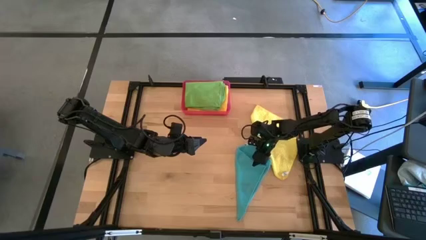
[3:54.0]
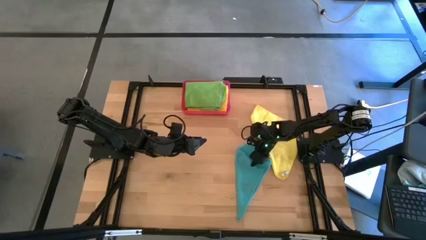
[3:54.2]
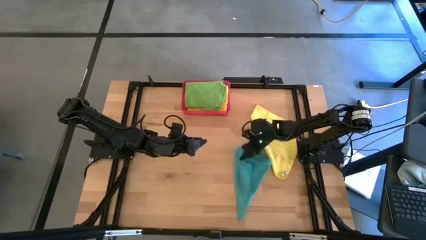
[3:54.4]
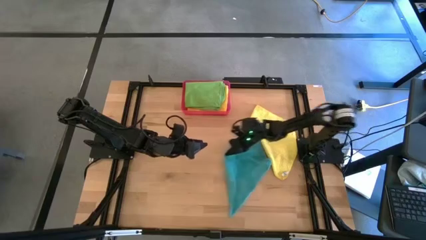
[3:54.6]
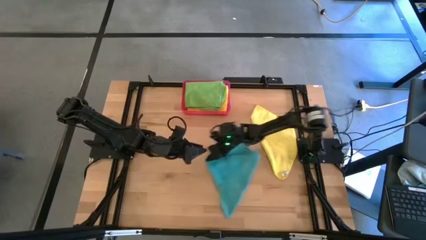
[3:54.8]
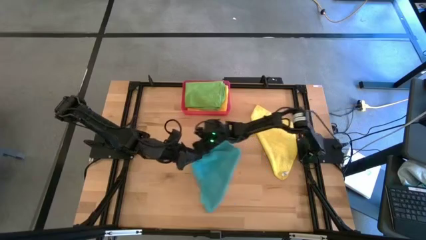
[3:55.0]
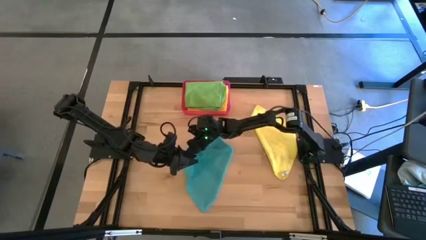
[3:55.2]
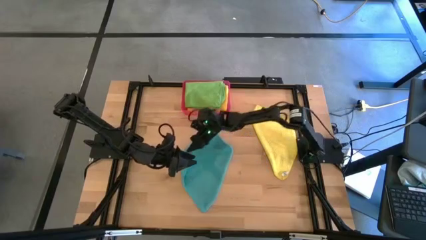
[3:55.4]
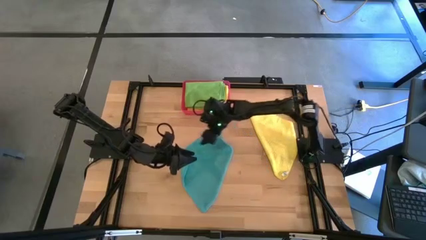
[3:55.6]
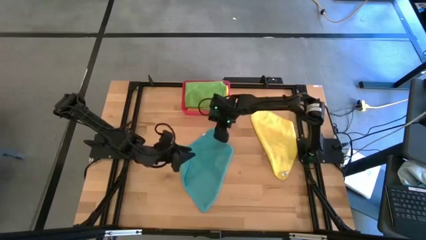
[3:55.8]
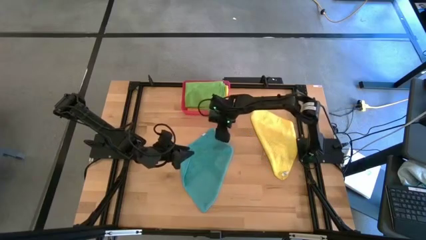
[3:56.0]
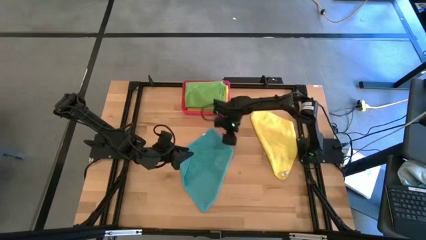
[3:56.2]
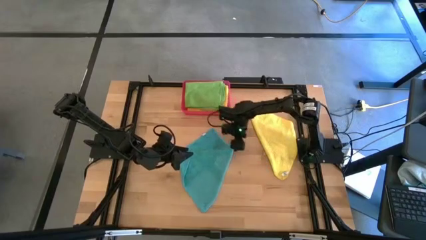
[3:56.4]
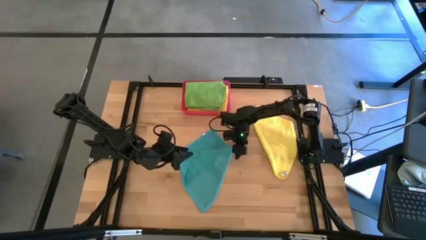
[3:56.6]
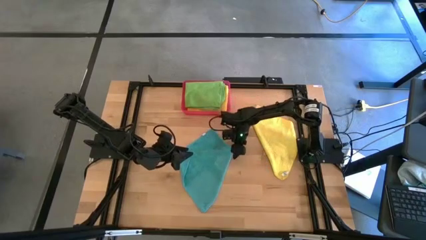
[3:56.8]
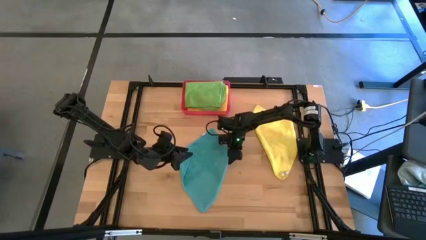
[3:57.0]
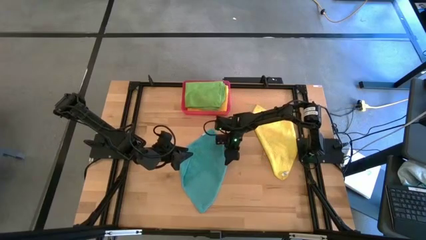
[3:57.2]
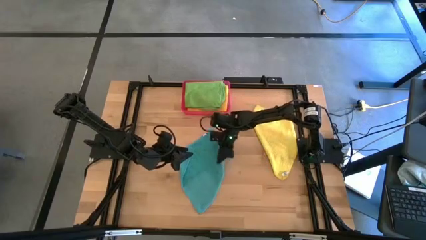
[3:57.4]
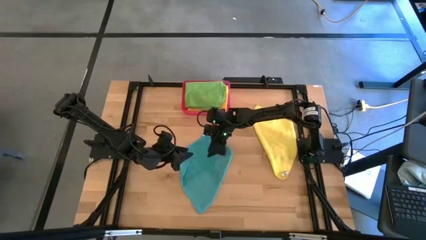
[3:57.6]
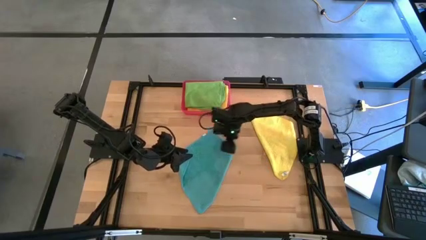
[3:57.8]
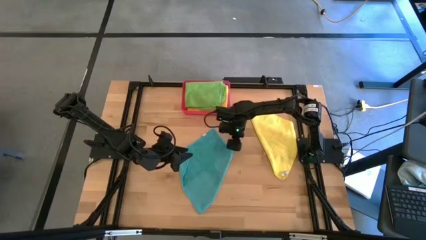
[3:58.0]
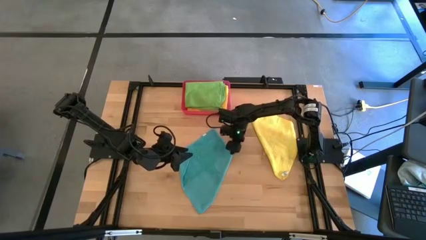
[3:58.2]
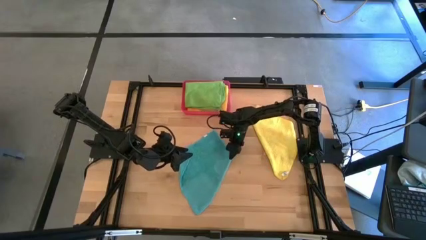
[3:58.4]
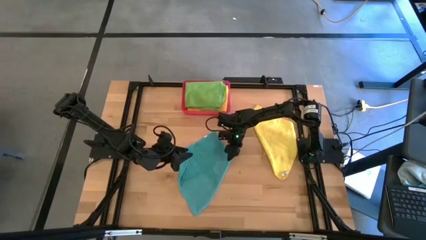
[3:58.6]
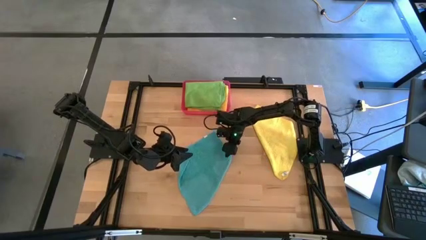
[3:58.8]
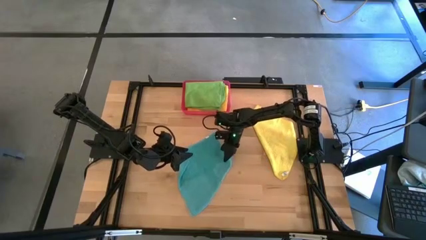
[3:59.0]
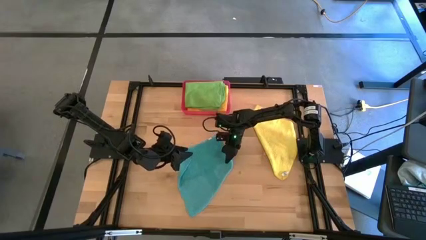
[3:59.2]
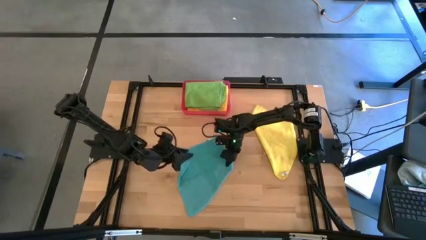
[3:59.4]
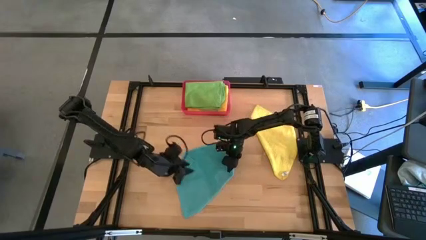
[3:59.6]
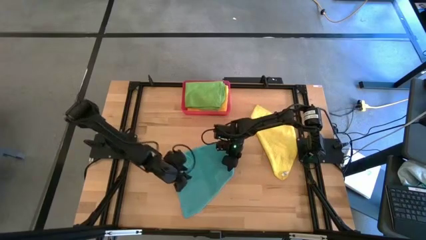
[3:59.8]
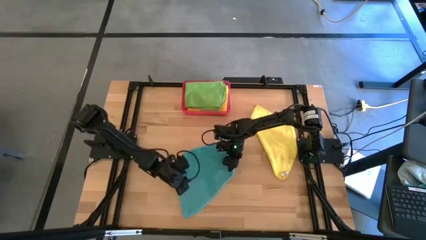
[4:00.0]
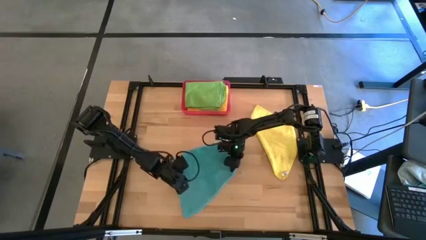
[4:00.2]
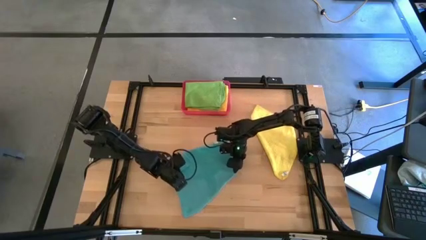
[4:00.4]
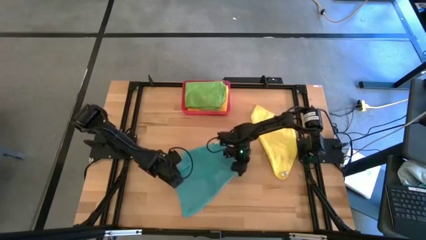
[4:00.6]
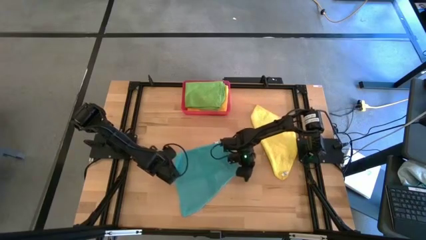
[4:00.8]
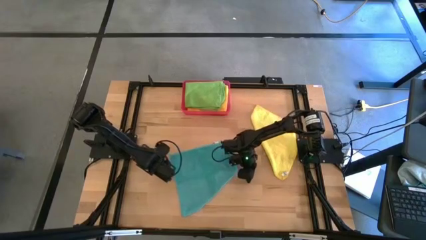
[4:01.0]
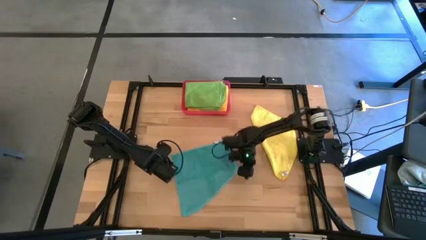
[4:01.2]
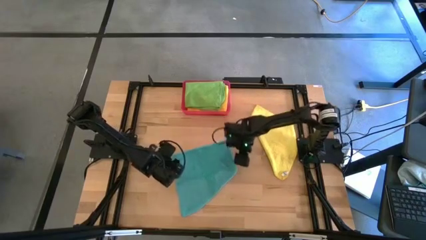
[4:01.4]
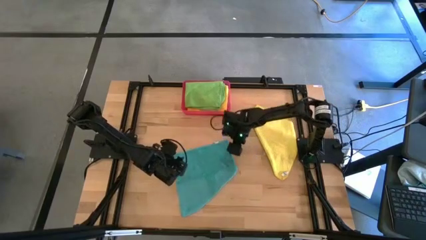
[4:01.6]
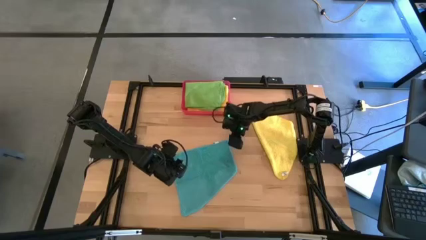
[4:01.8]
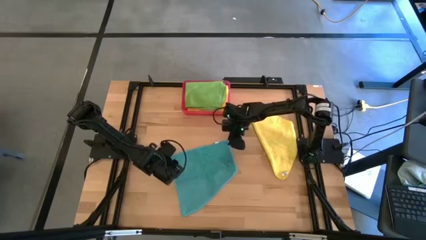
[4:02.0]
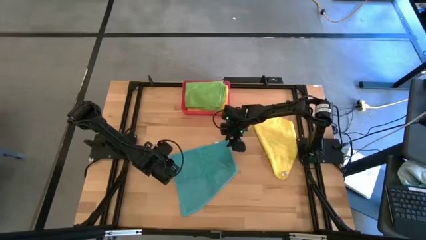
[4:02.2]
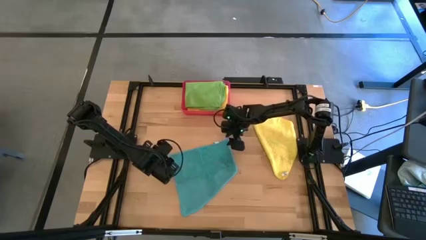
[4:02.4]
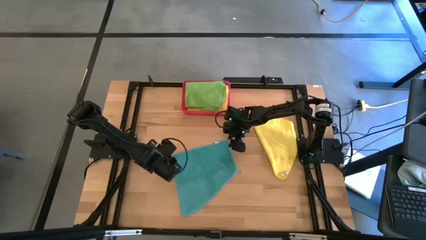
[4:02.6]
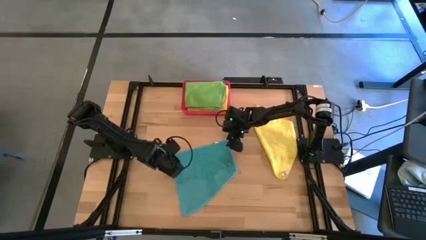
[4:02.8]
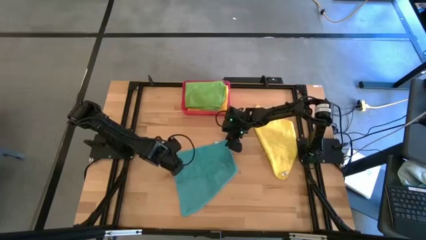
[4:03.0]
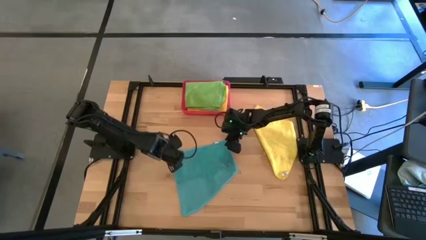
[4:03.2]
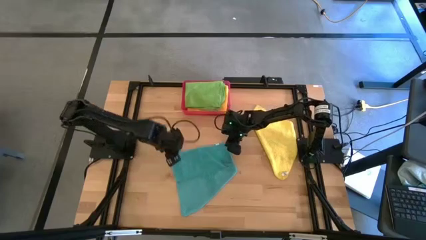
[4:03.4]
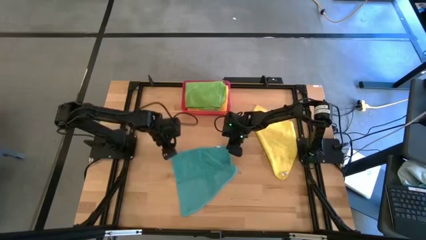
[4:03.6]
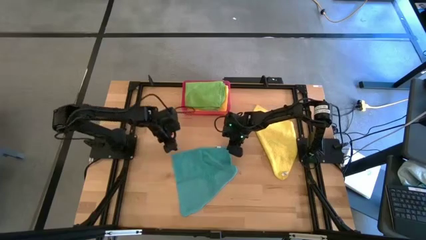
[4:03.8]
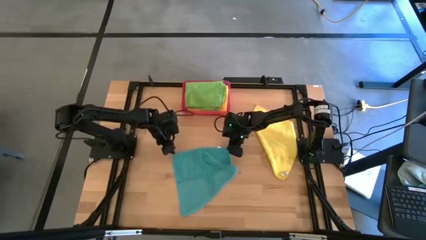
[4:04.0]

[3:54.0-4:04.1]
Task: Fold microfiber towels
Fold the blue microfiber cloth

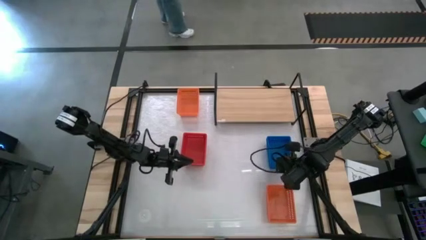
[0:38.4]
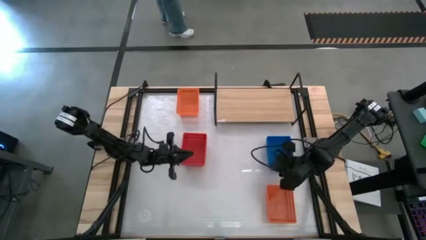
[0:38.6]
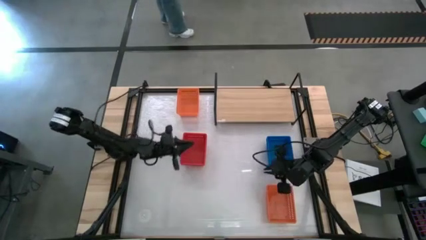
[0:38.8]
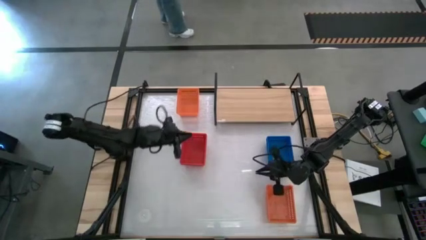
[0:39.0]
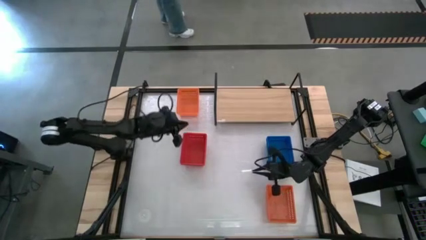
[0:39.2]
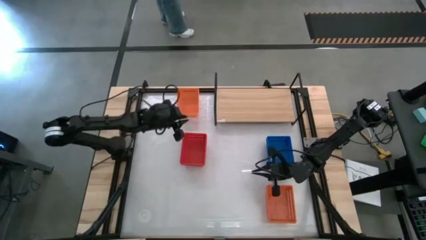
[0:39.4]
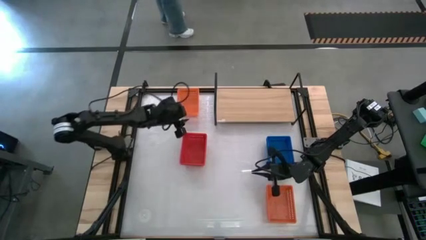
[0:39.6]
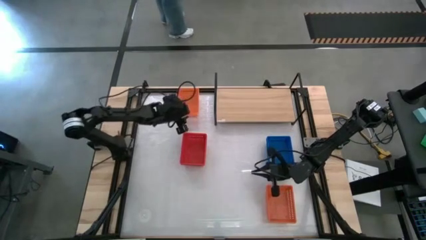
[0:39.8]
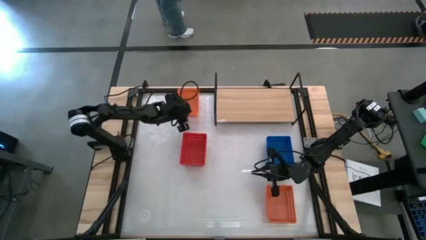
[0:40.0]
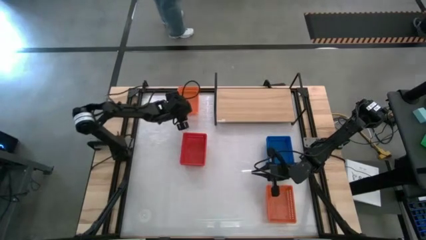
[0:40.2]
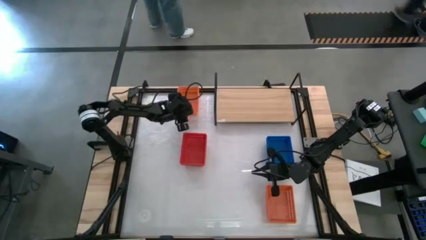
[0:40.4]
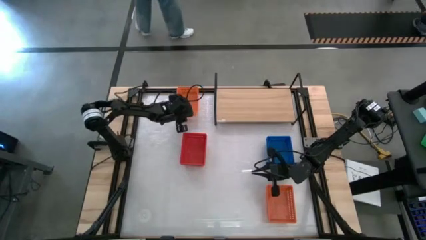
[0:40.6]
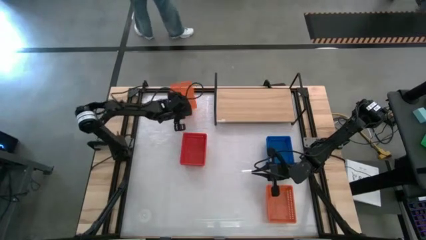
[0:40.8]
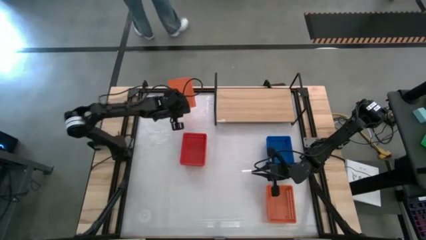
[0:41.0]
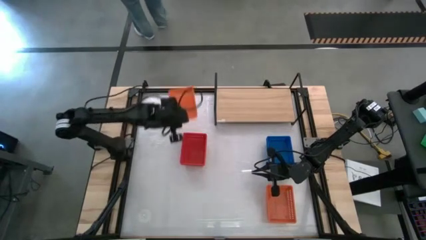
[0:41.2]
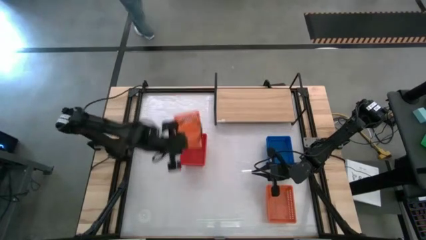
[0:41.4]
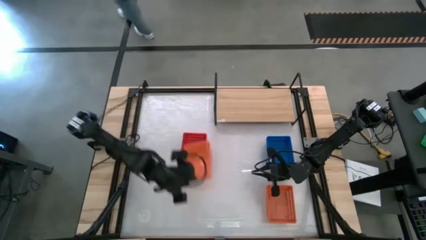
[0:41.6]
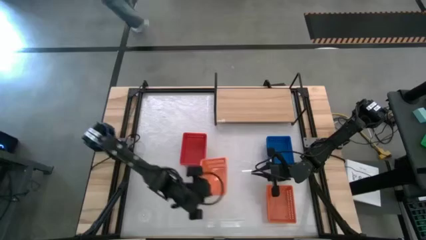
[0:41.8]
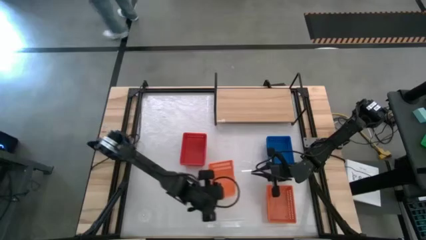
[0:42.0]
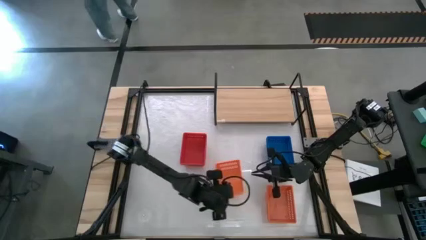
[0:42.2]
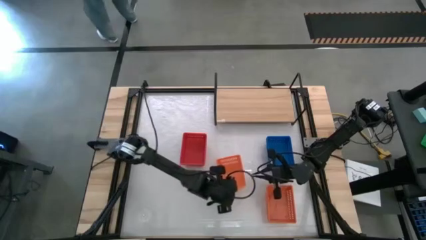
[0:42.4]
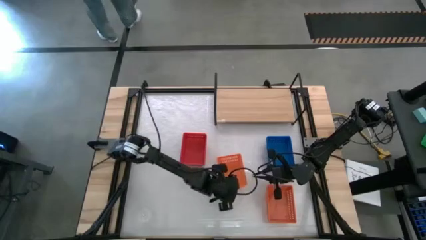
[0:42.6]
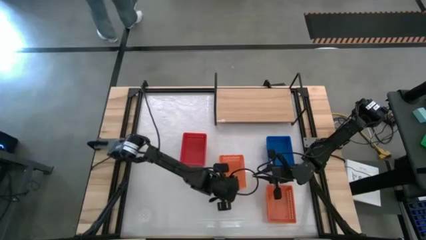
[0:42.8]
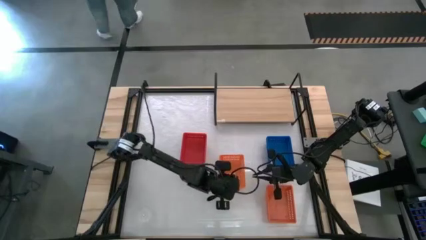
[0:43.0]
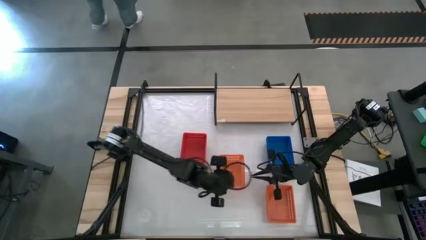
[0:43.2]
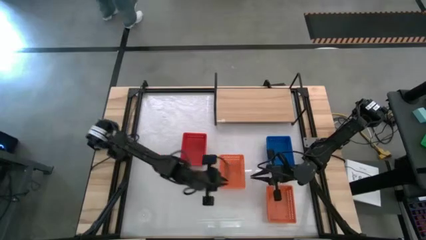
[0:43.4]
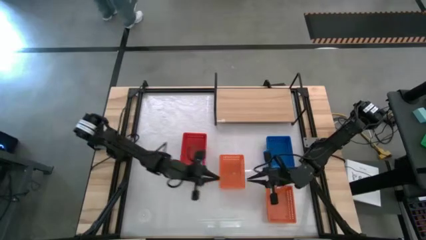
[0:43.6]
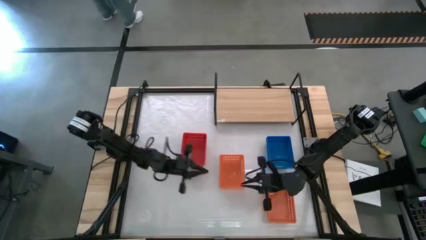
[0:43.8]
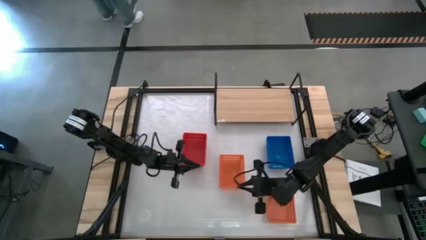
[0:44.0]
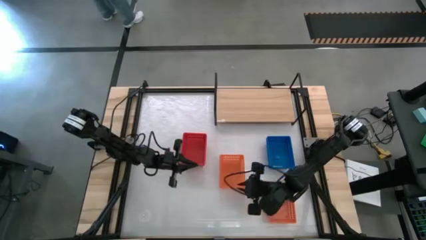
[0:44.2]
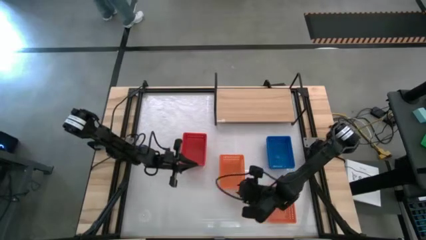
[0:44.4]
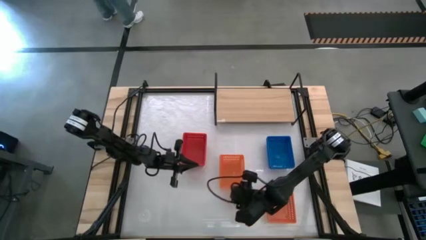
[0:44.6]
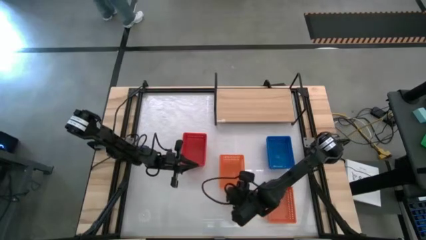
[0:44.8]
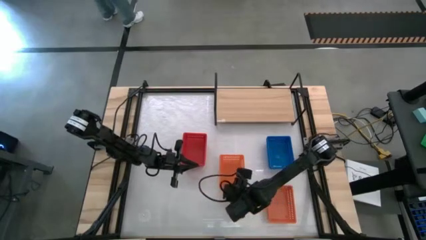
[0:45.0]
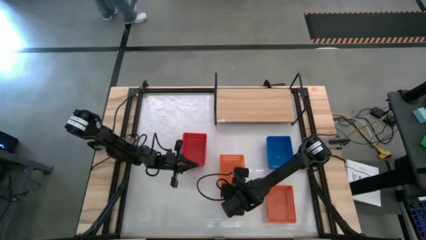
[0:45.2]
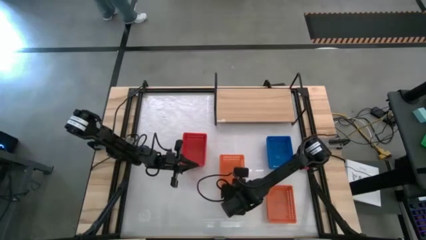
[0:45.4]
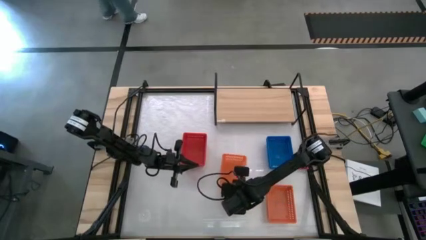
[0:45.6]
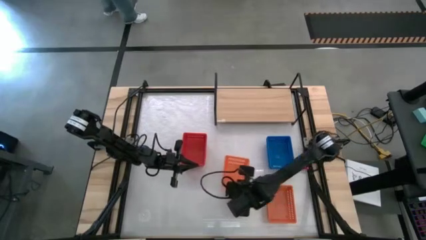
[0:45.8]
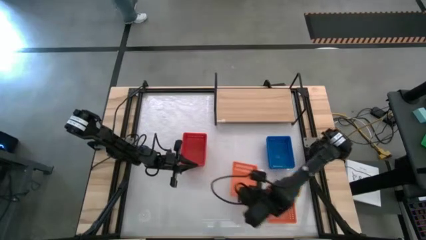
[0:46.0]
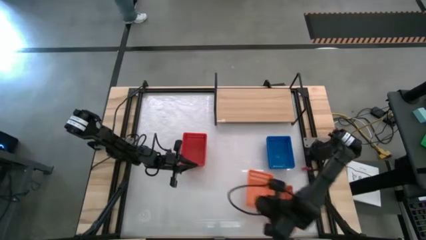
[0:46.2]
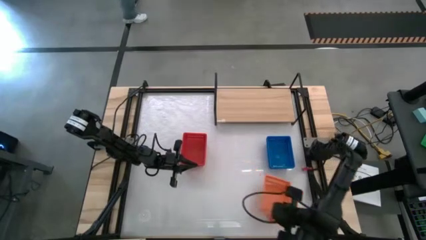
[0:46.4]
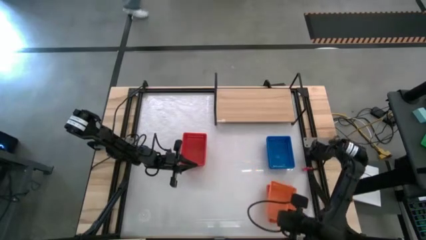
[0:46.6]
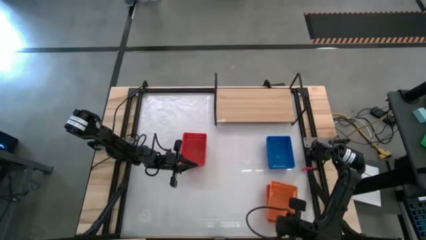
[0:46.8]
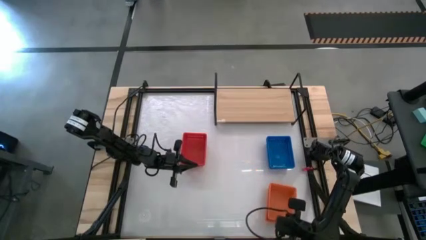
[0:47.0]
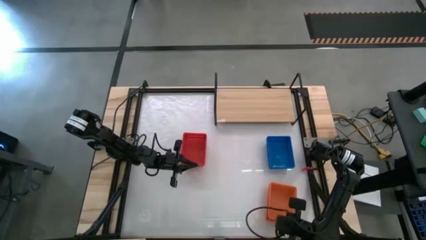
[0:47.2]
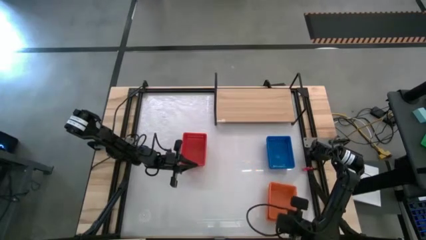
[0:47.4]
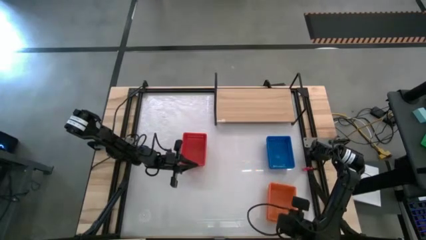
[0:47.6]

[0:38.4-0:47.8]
Task: Stack baskets on shelf by color
Stack the top orange basket on top of the bottom stacked orange baskets
